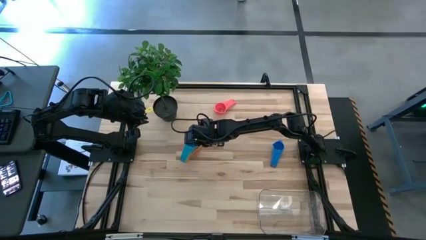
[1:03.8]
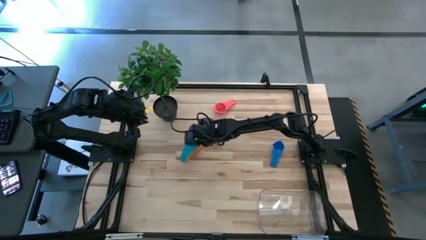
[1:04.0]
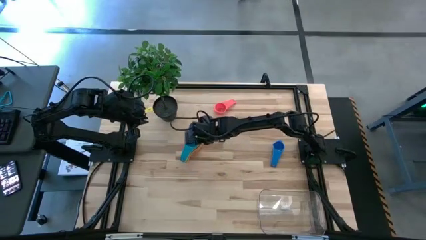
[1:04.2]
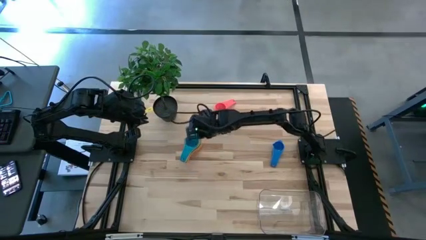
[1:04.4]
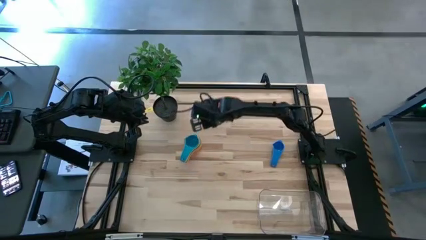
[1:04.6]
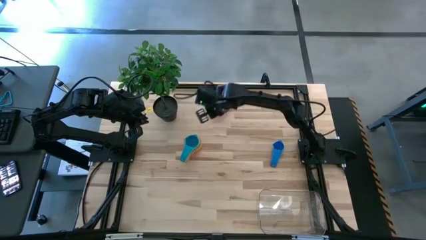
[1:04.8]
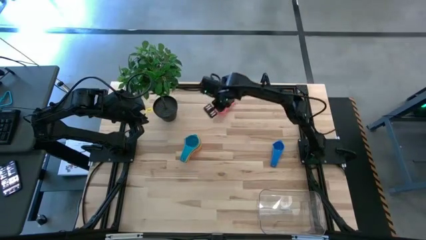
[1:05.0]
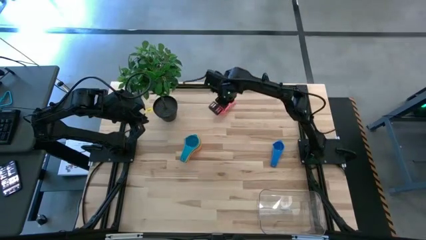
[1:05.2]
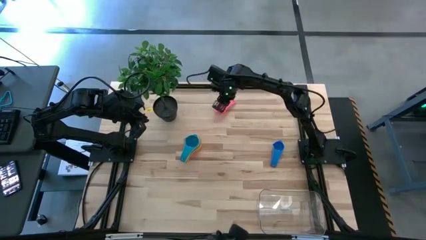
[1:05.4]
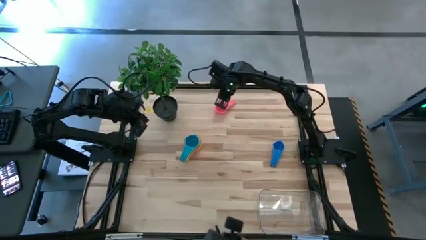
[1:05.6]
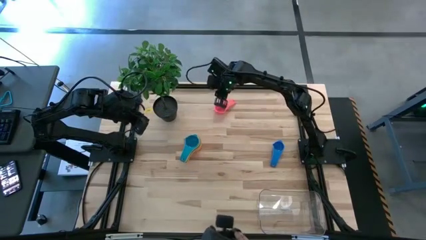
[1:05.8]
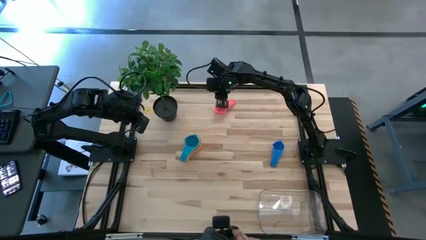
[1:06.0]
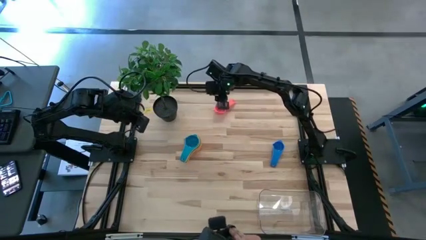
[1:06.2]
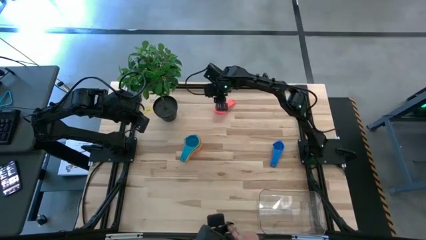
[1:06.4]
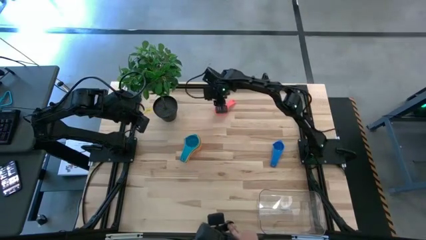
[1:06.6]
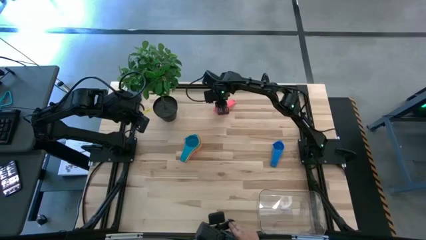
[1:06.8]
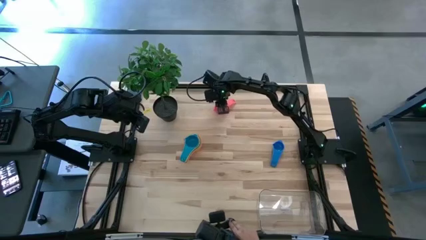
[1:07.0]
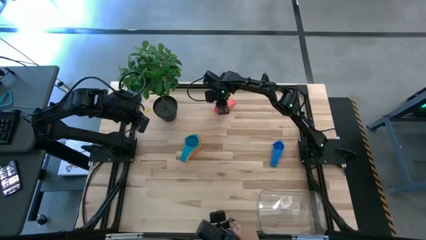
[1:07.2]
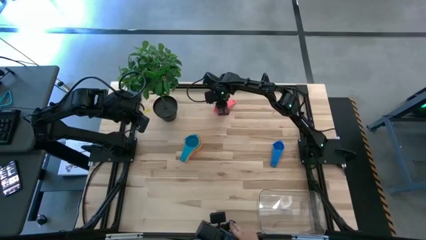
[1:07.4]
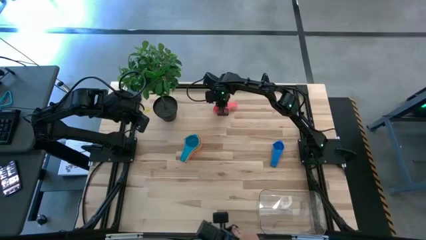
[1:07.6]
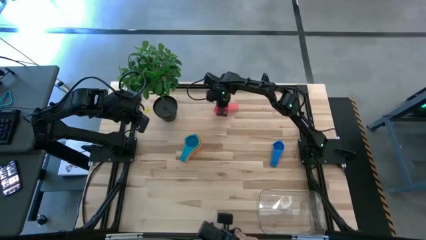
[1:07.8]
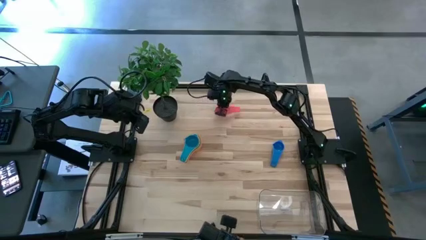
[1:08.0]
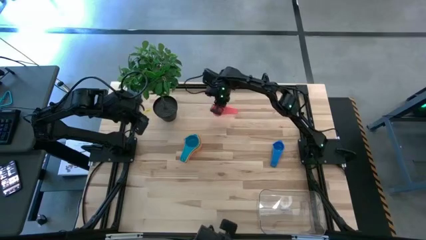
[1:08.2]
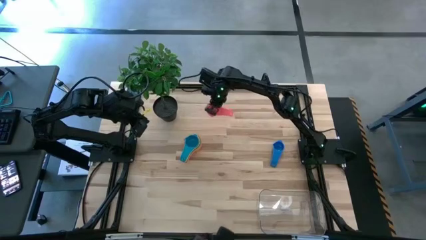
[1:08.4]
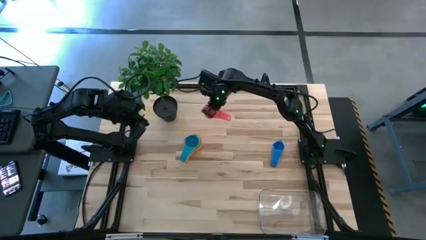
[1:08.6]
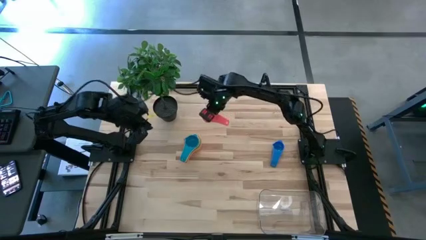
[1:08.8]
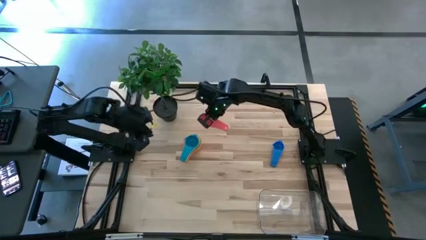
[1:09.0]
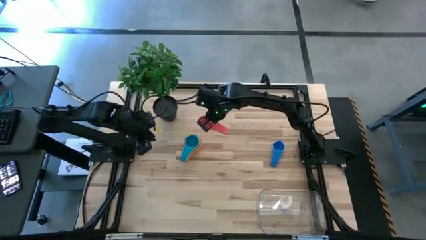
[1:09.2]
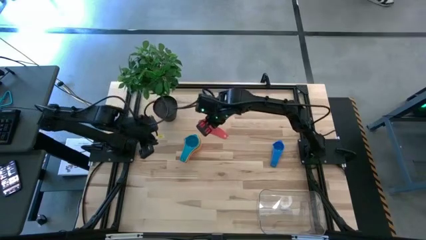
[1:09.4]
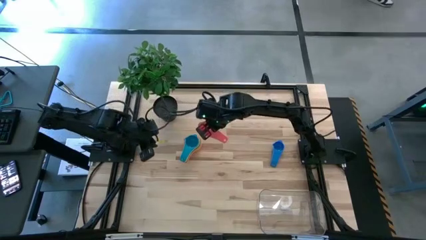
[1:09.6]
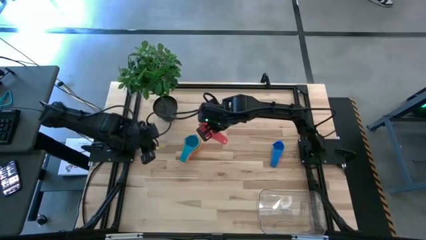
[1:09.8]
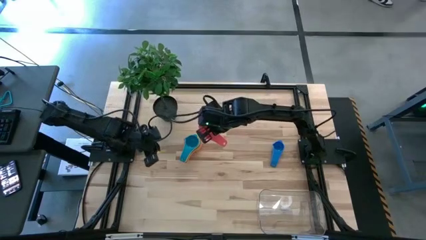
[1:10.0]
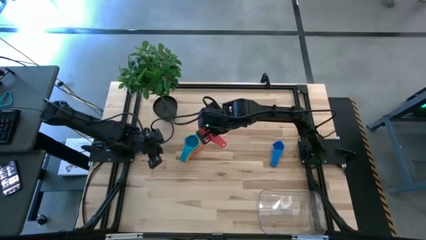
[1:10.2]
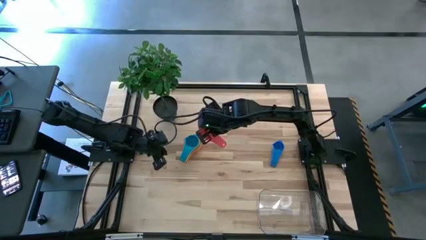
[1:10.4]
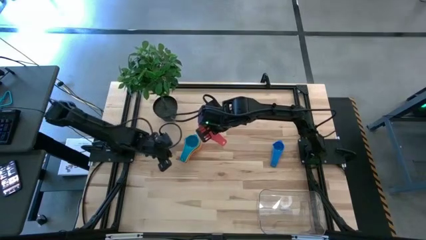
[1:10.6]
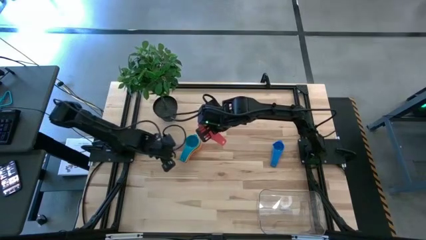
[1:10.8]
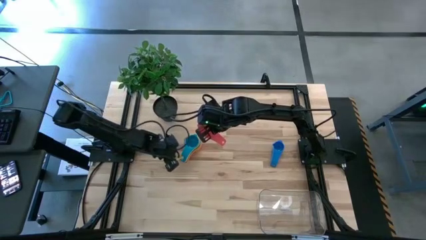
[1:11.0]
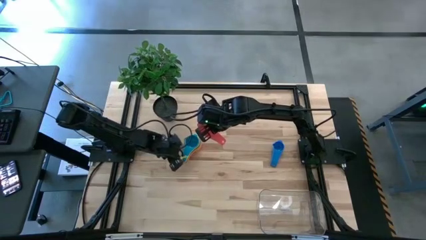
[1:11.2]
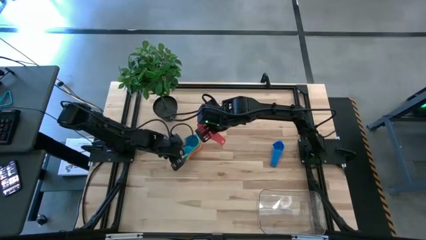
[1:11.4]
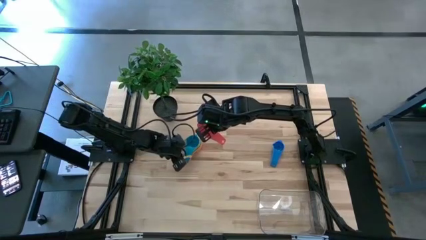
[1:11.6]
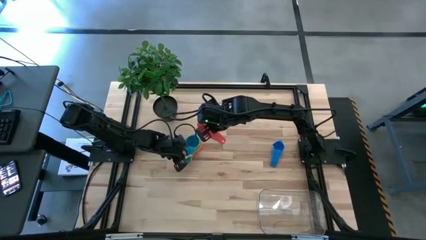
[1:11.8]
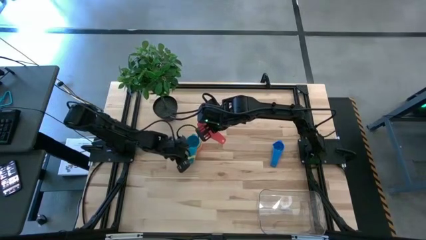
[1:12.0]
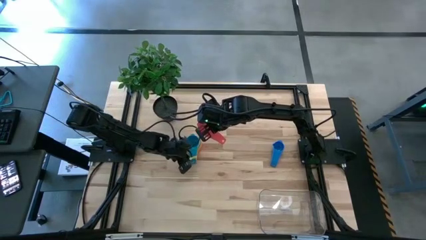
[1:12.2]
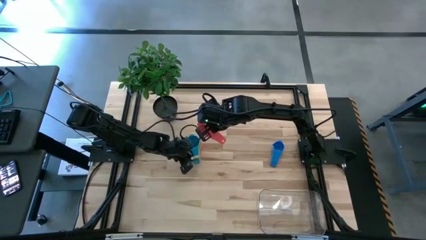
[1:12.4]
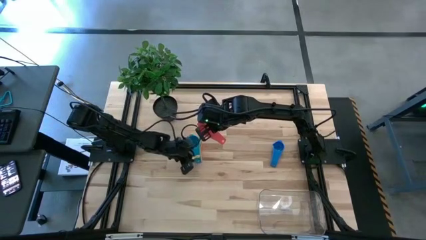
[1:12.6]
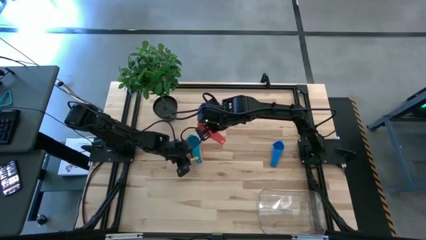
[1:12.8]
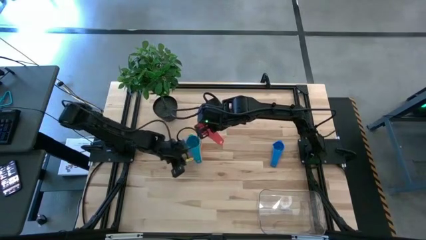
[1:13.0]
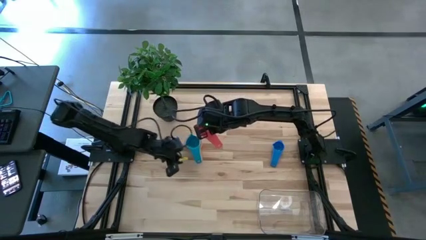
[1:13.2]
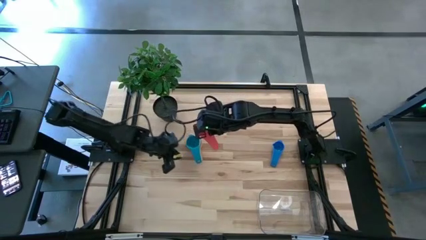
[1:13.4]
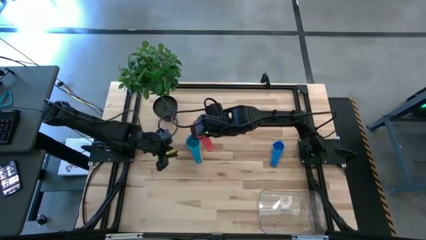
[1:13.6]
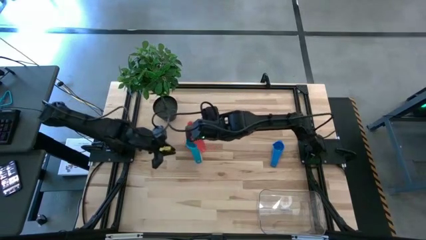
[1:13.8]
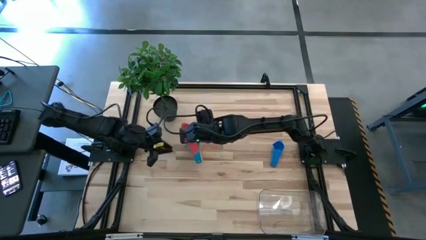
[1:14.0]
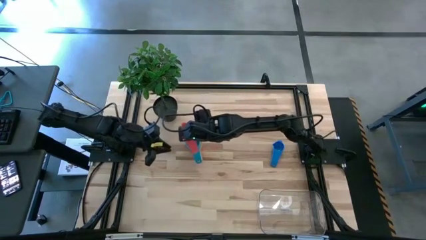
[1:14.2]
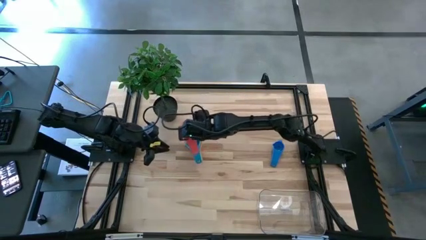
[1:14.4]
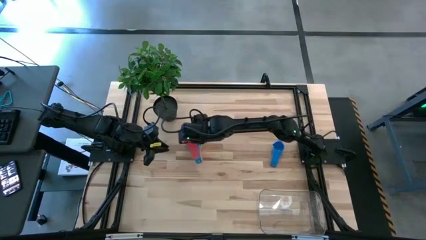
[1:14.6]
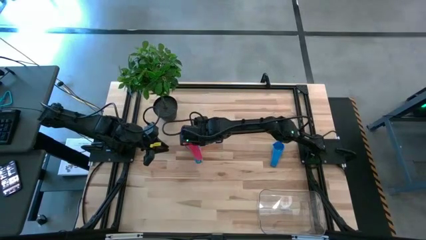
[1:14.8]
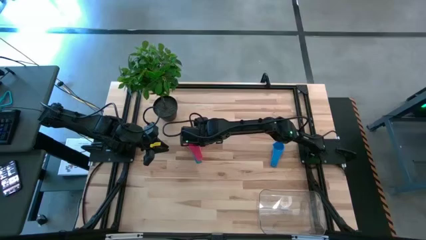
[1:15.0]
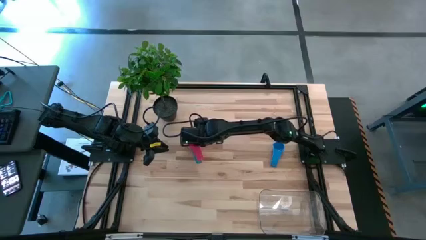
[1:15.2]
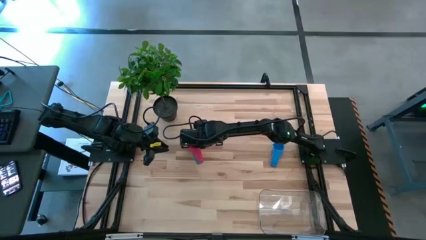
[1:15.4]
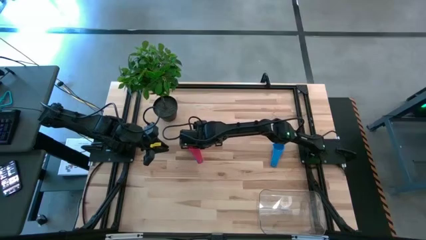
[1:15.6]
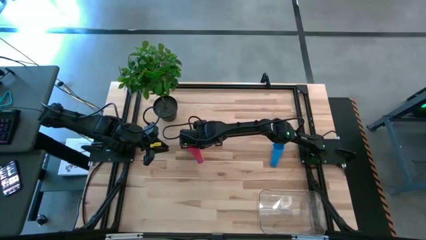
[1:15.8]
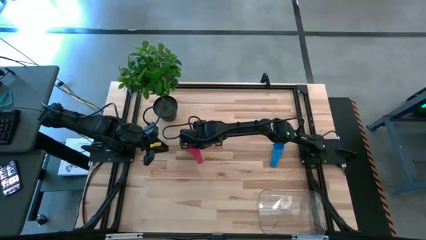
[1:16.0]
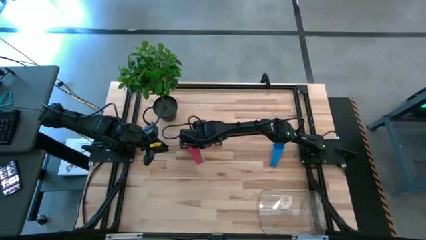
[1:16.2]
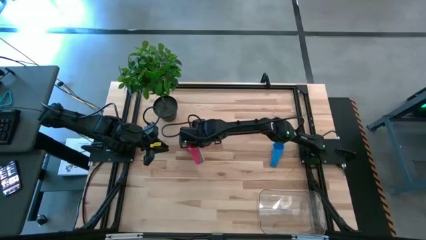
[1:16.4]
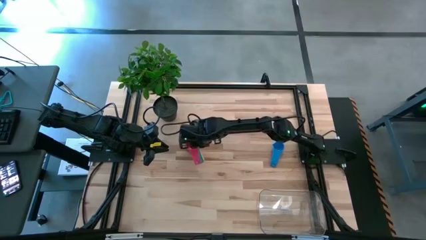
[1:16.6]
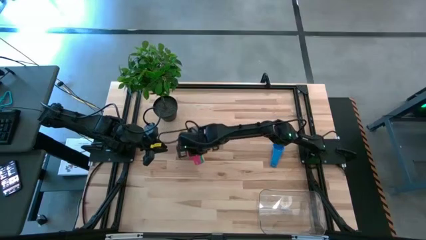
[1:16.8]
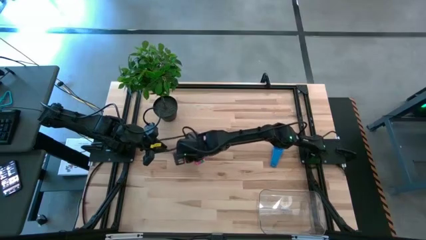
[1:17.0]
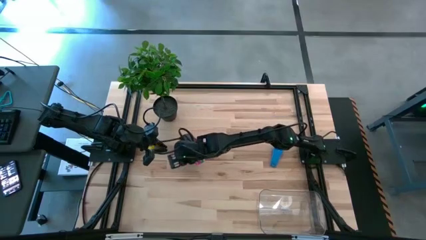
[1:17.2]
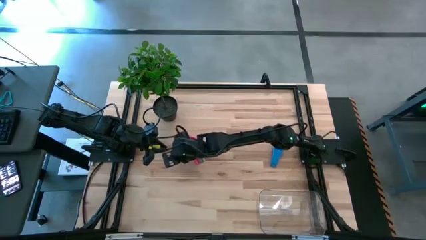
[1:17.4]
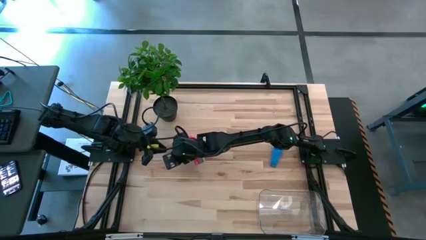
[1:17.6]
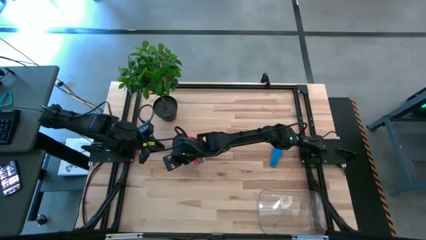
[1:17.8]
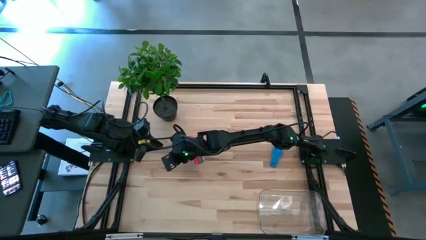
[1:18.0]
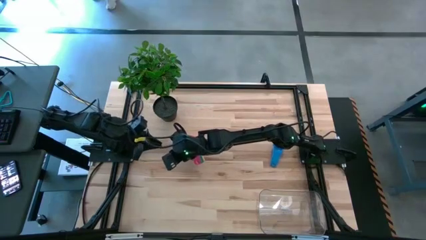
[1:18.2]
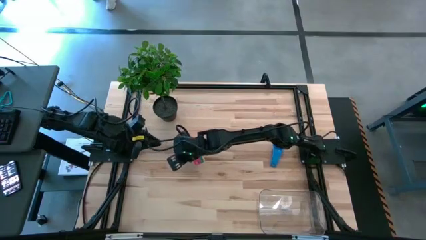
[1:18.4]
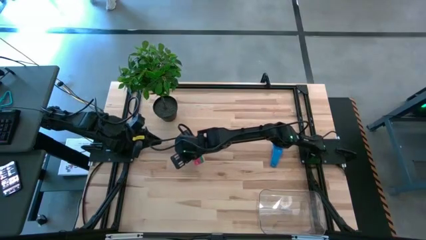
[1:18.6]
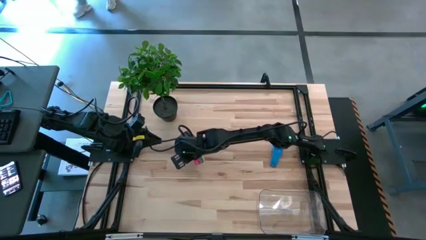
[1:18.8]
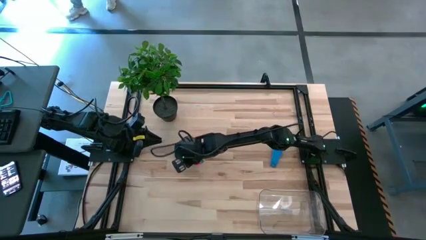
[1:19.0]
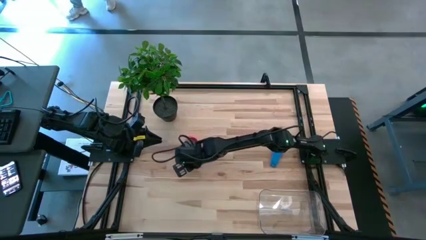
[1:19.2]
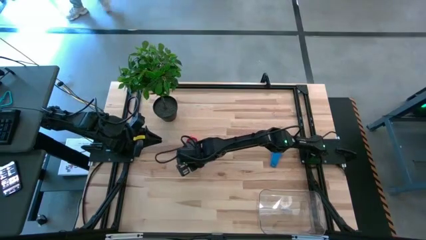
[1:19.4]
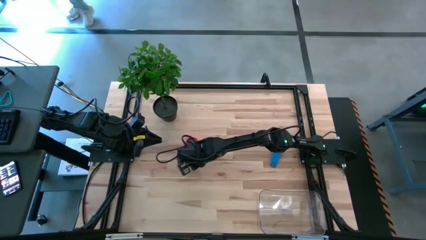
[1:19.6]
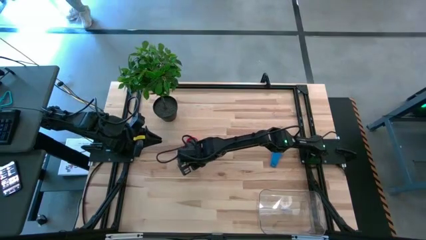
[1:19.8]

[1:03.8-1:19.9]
Task: Nest measuring cups in basket
Stack the pink measuring cup on the light blue measuring cup
